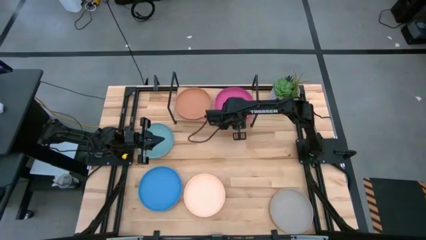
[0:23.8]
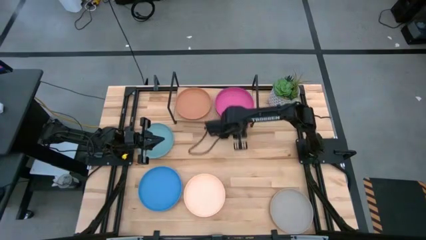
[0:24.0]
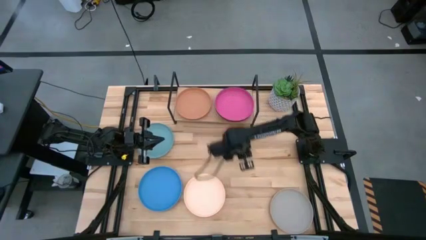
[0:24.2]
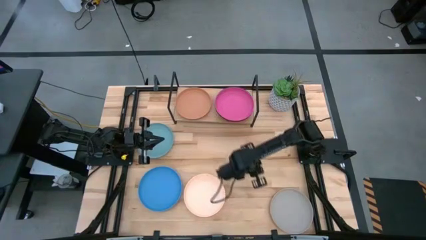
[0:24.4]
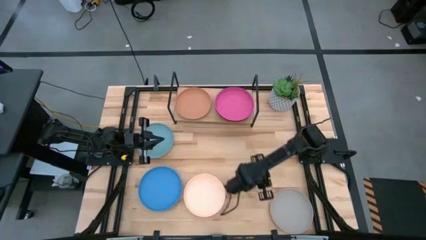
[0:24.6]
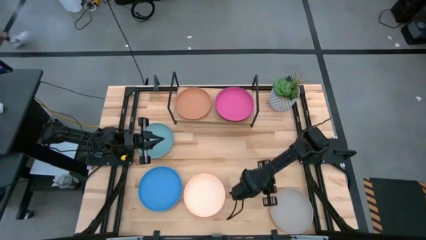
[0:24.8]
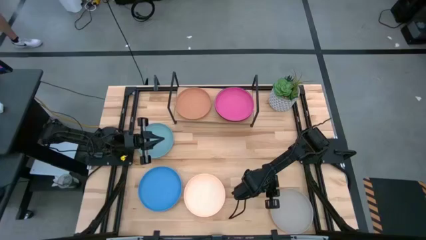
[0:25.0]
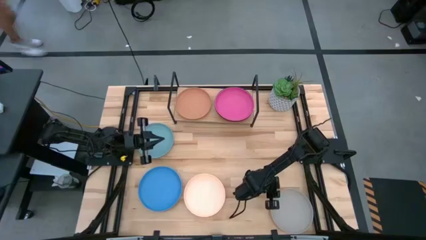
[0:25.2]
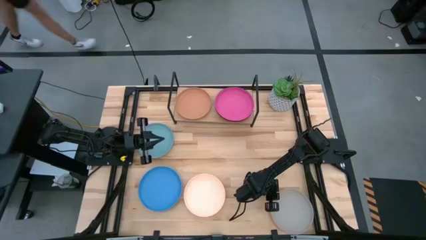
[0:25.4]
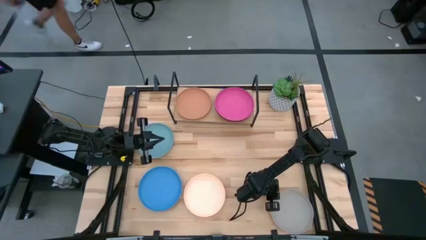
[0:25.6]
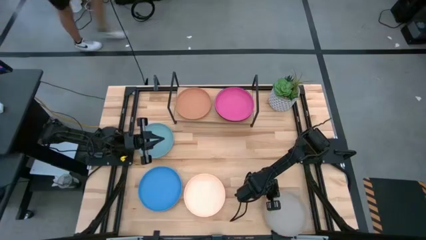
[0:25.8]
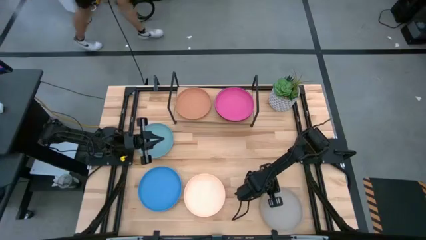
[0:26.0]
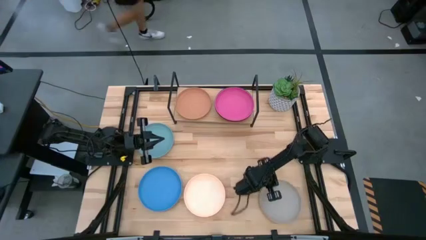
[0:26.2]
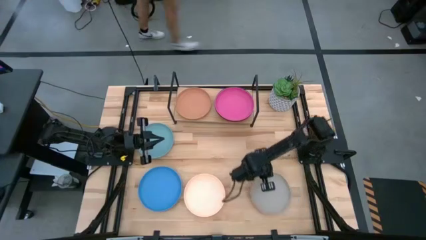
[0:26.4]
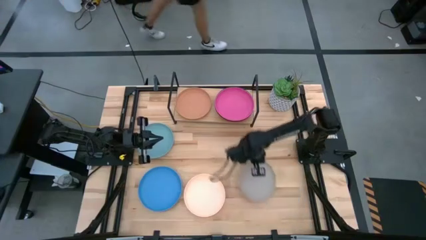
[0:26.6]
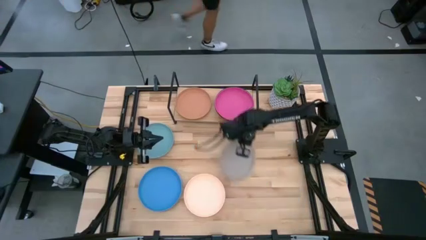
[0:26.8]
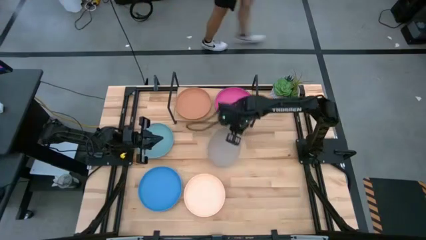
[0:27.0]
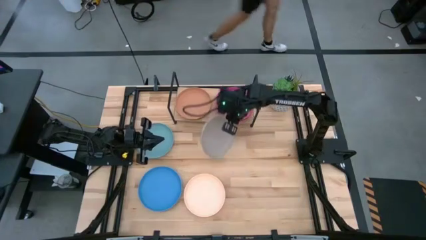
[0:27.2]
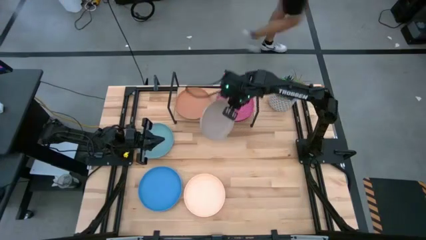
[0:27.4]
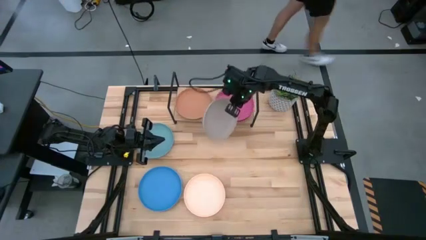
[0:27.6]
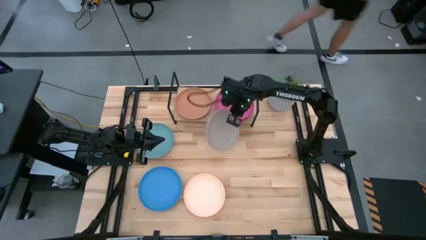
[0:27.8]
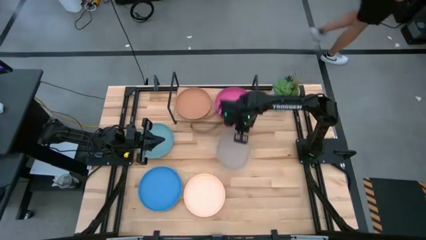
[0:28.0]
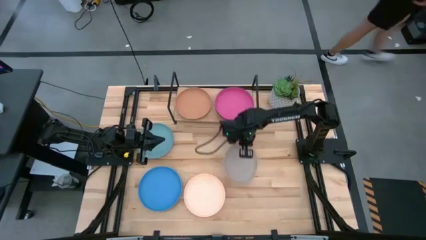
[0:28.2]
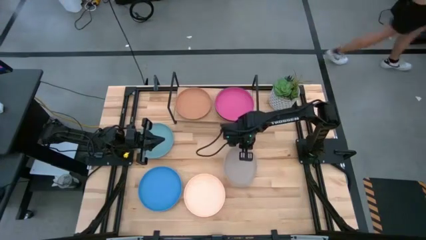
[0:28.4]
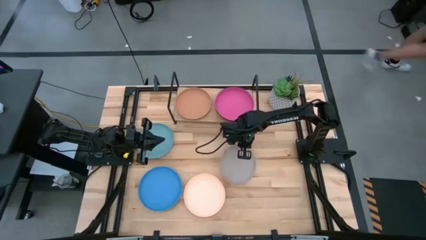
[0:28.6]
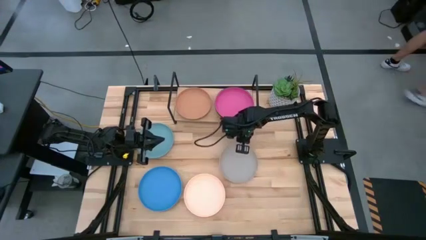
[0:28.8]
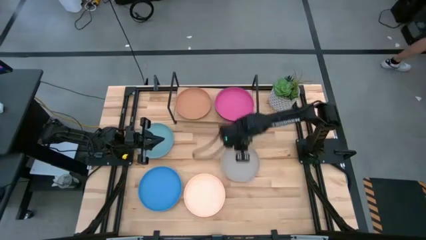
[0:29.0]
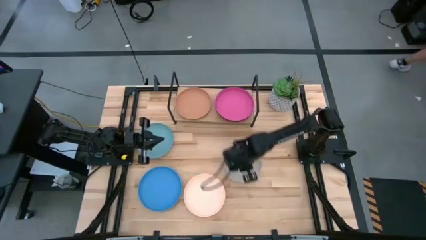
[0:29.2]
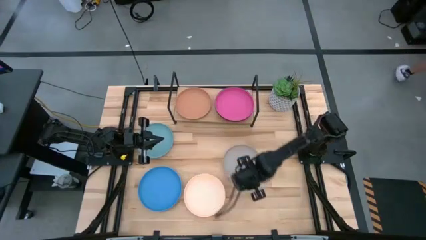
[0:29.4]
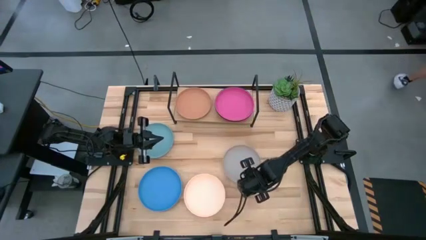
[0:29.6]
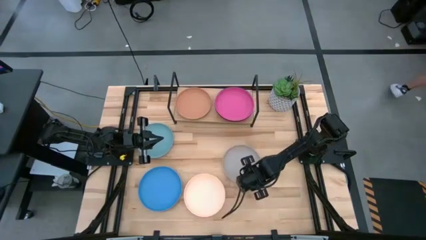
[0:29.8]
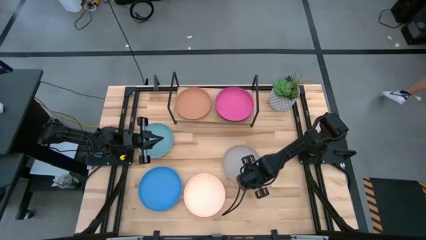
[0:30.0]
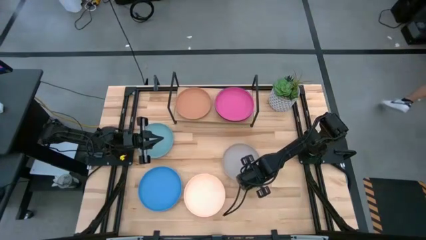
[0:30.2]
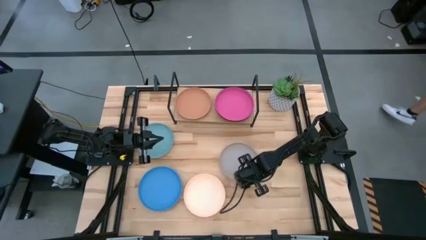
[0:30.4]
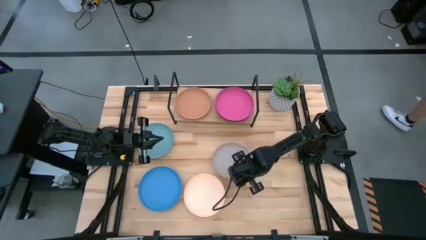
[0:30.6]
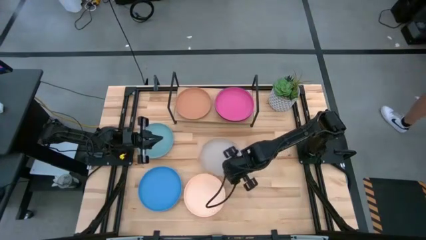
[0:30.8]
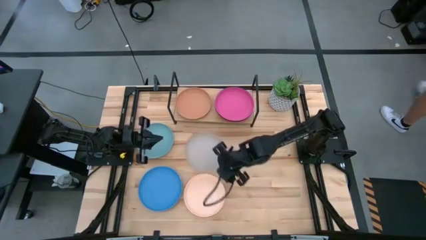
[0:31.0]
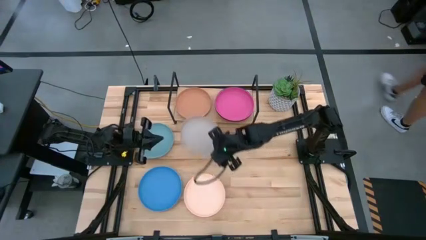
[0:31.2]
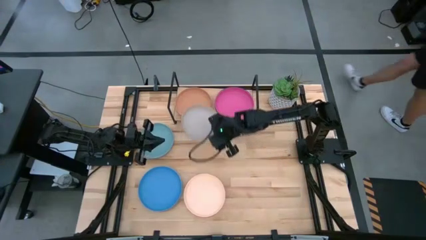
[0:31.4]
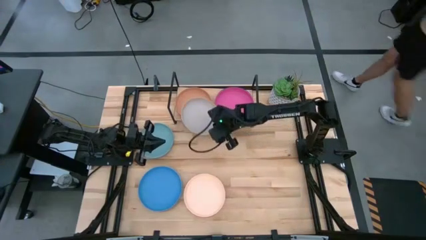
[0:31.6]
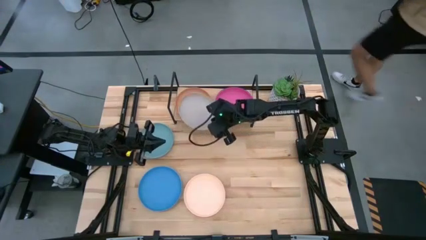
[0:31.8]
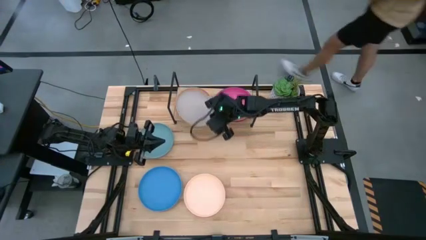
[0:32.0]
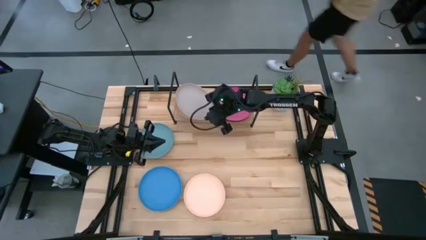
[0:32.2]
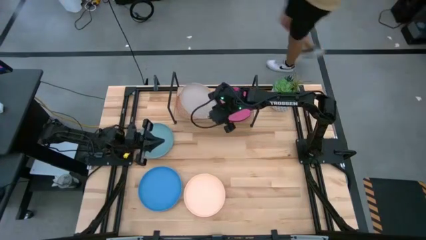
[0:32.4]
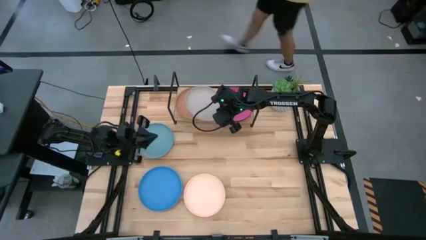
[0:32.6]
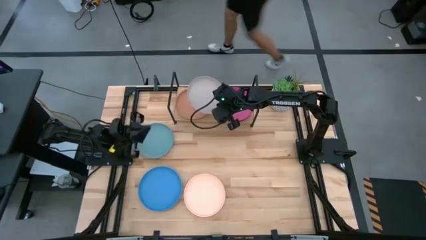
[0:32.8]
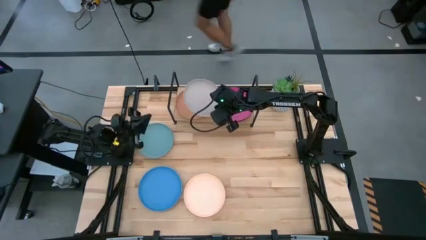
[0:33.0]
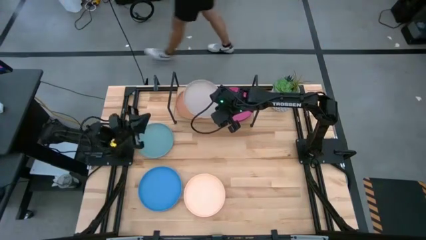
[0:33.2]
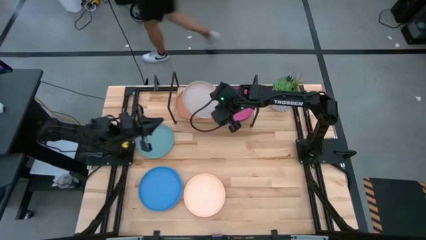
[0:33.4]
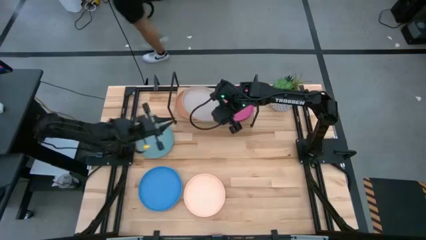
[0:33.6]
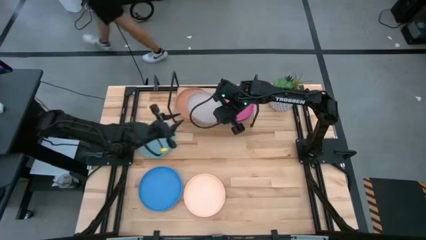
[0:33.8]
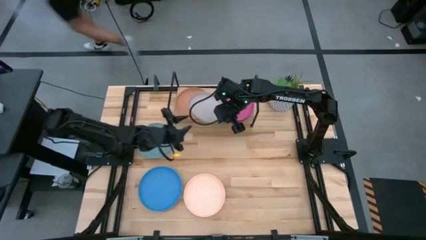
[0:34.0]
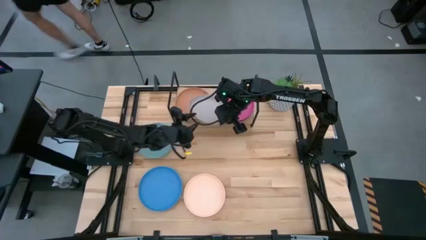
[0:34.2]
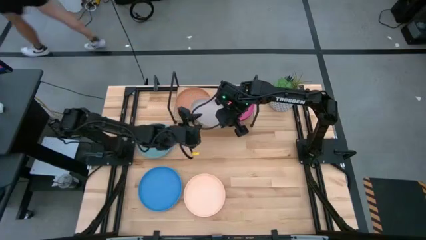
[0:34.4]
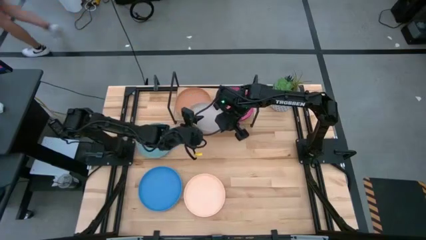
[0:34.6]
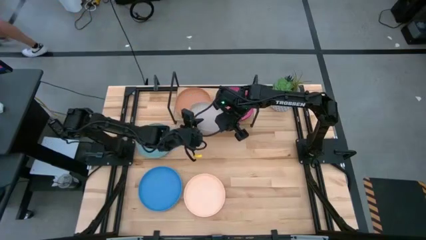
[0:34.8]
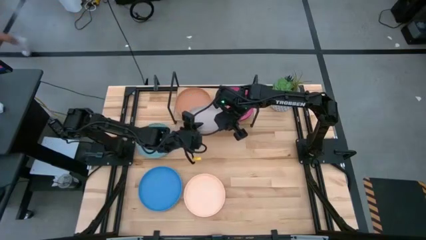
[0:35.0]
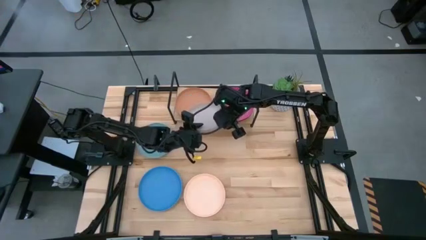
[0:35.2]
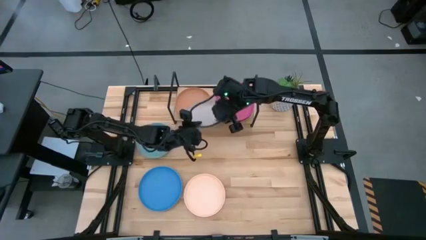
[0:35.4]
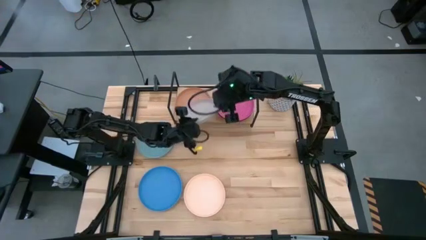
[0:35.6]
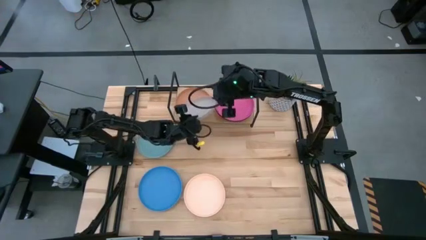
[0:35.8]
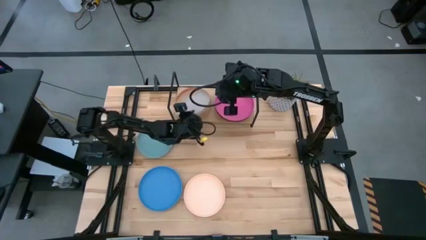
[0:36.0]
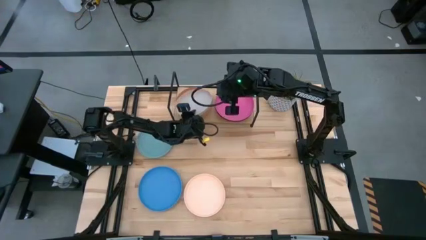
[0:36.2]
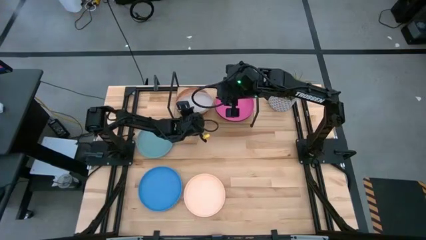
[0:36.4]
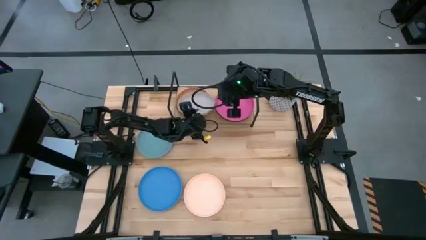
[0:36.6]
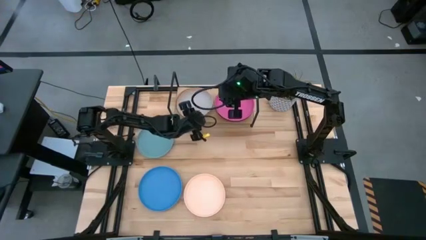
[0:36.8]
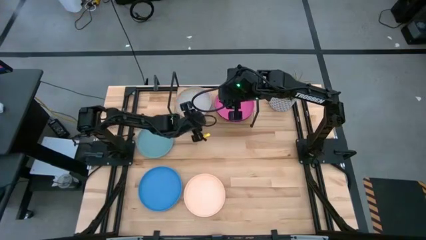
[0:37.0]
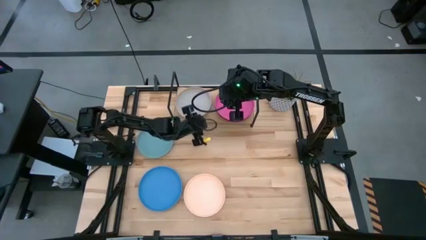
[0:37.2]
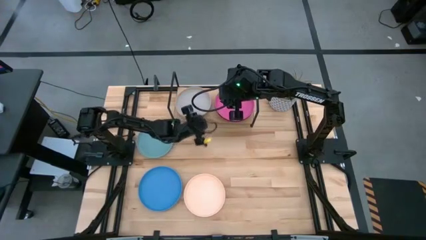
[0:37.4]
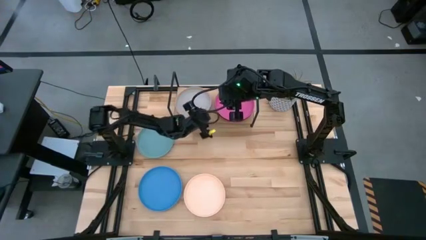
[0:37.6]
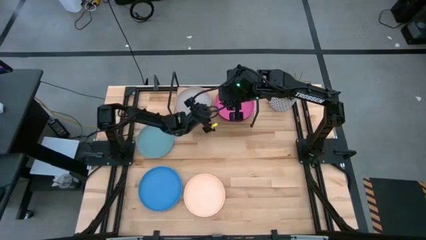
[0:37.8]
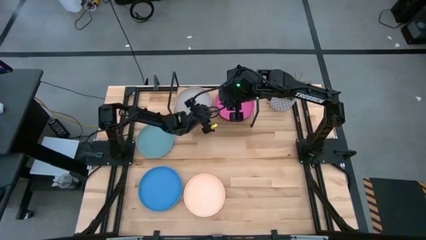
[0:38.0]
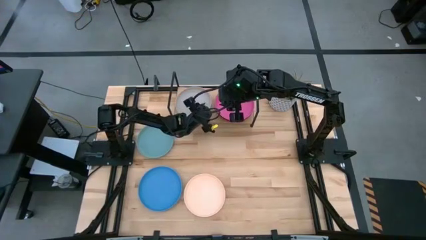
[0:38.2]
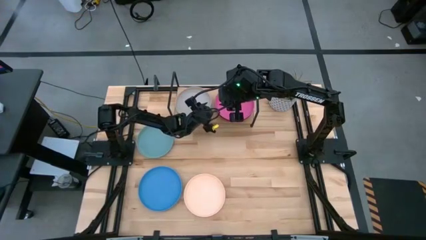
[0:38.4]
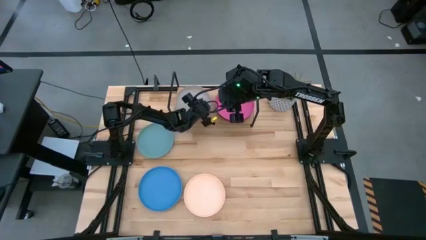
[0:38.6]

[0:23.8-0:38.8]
Task: Place and stack plates onto a shelf
Stack the gray plate on top of the brown plate on the shelf
